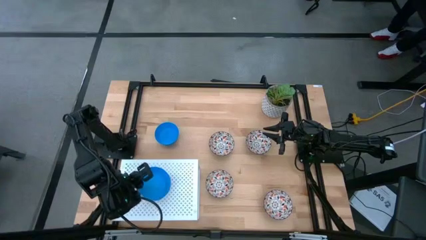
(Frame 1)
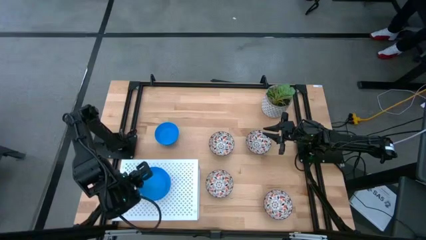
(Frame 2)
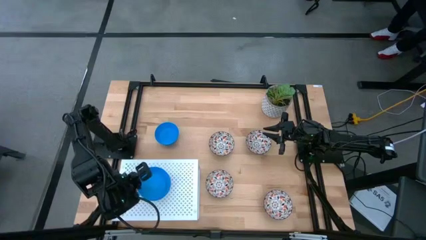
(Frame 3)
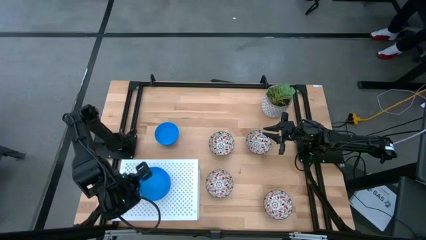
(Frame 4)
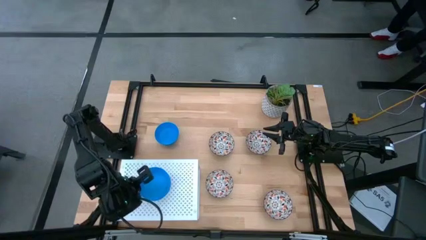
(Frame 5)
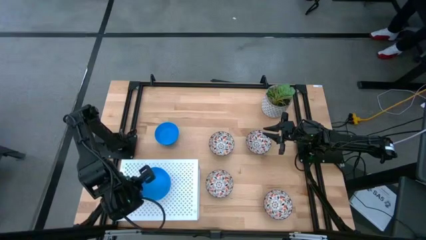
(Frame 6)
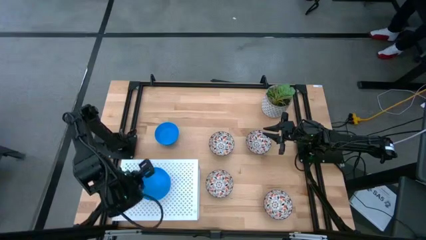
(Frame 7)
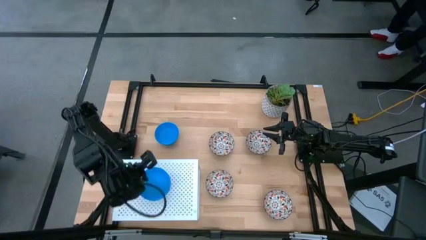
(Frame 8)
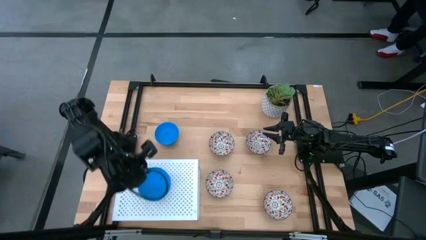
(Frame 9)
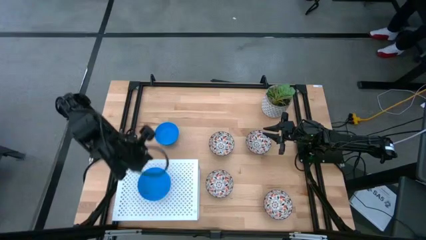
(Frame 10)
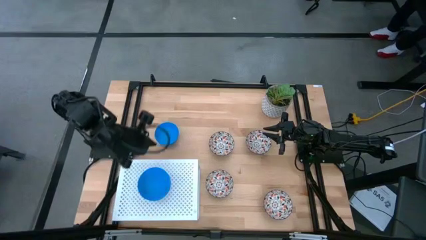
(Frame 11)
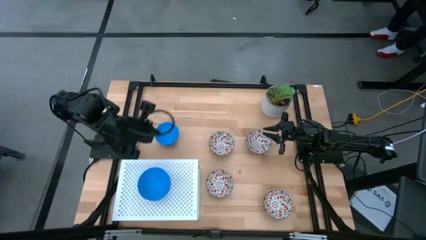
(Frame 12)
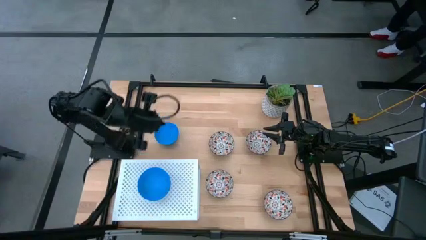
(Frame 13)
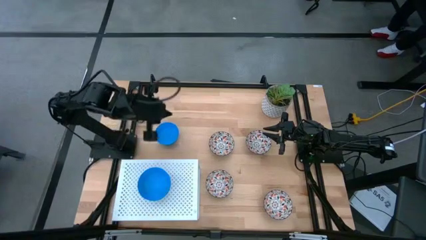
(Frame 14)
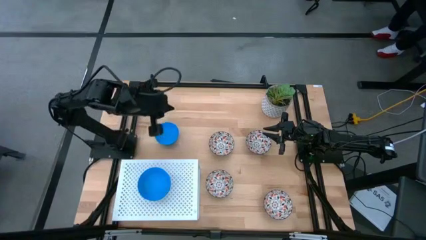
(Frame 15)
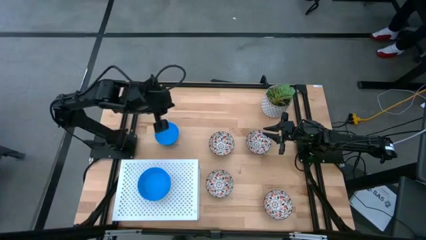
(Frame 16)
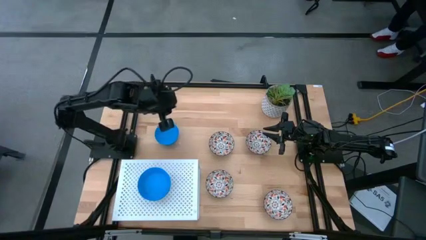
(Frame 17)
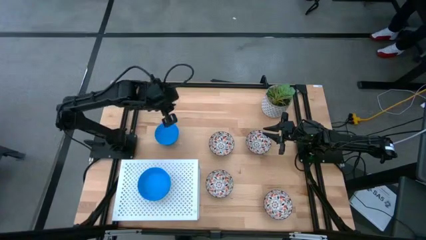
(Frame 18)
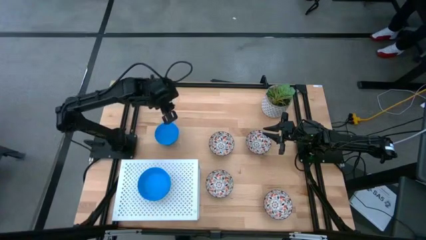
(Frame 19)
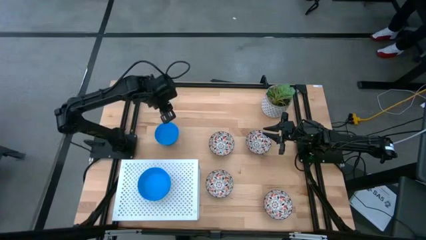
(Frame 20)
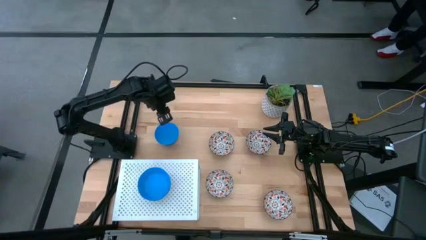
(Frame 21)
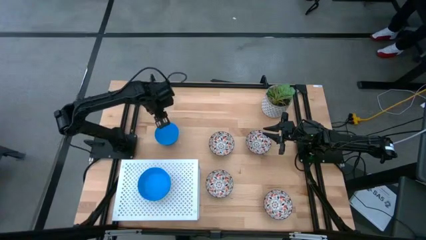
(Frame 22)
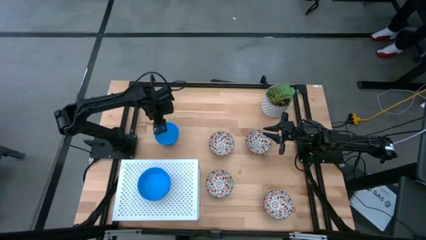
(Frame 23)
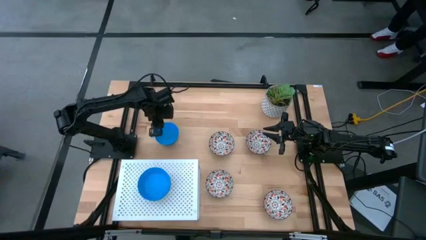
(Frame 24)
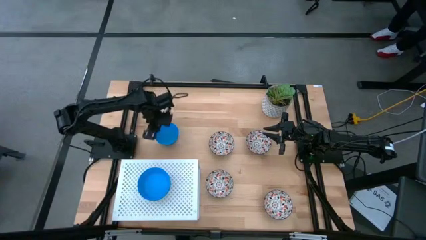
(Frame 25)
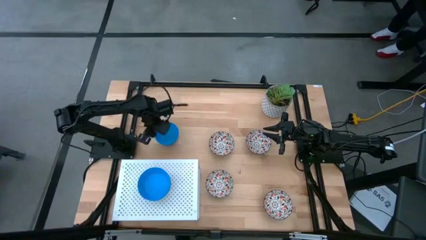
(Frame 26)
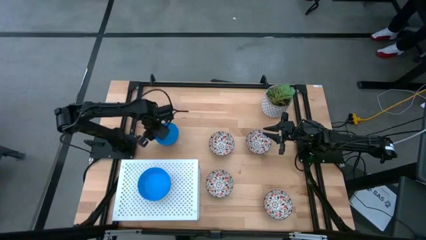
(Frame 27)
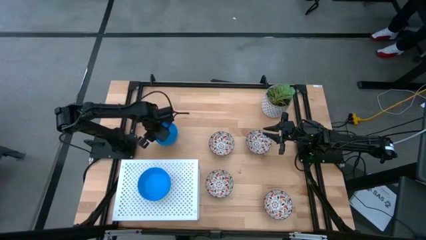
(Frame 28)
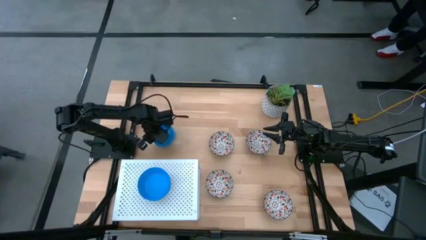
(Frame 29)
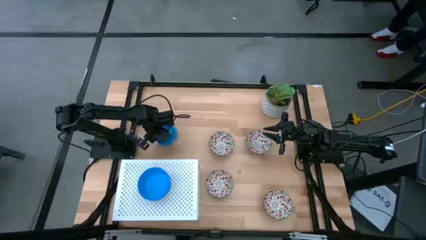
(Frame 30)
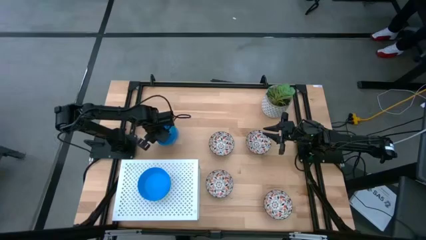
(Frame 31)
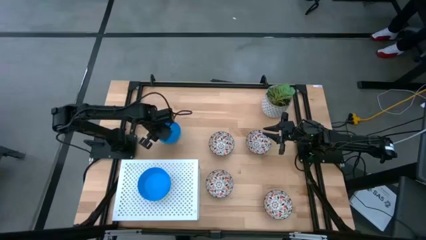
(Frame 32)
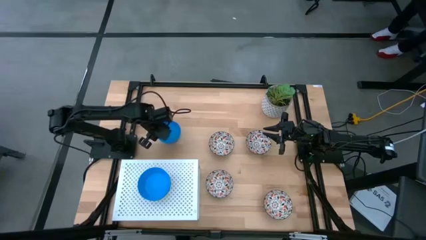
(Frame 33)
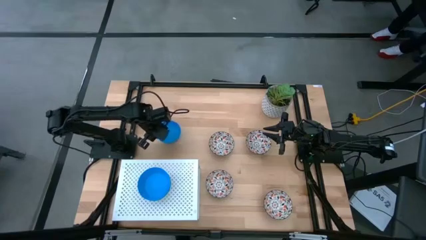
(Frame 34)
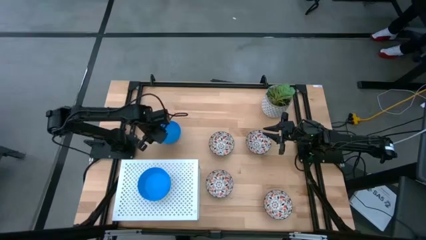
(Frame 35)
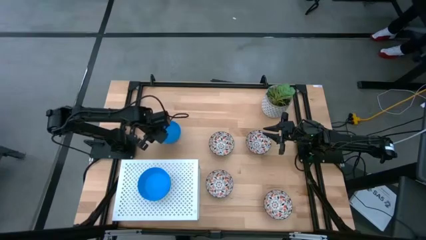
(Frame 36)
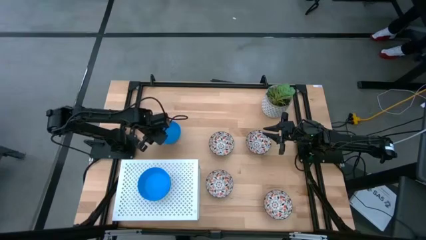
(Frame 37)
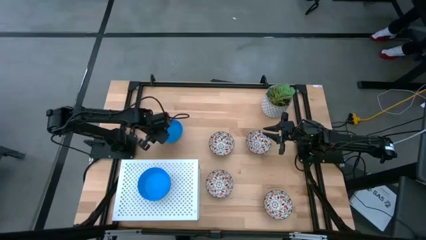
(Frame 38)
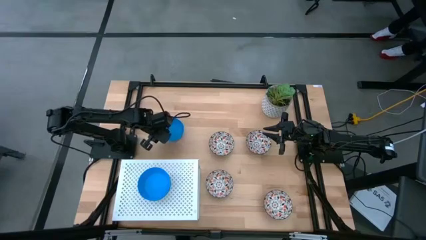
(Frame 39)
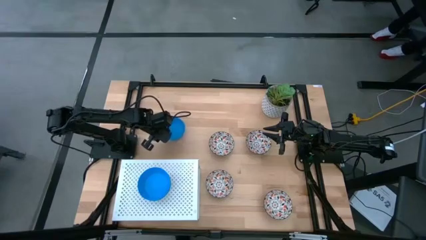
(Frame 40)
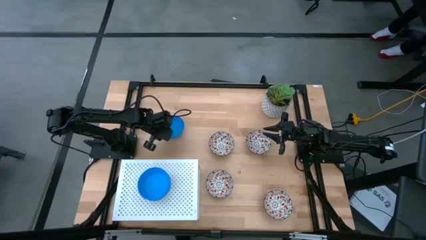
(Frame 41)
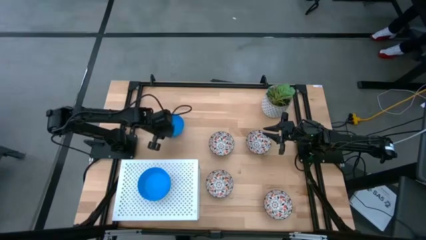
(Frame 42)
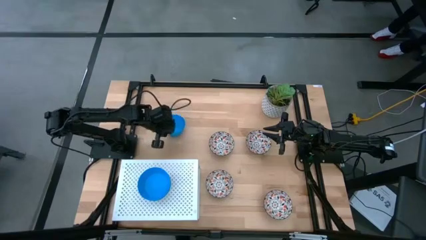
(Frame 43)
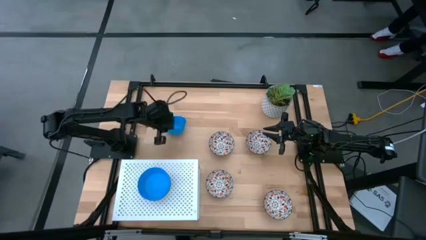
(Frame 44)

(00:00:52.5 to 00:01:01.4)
Task: Pick & Place Mini bowls
Stack the blue bowl on the stacked blue bowls on the shelf

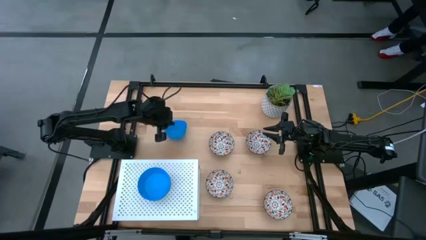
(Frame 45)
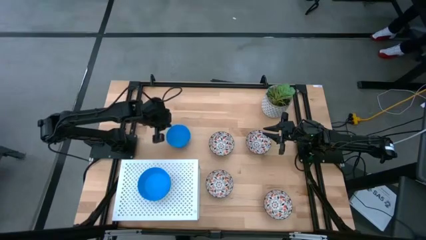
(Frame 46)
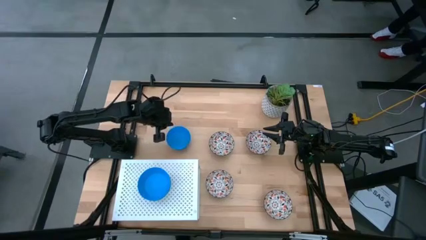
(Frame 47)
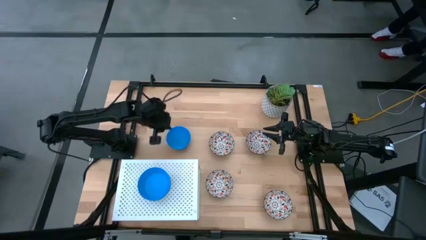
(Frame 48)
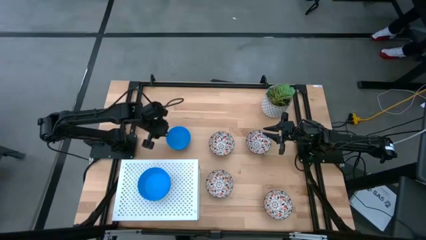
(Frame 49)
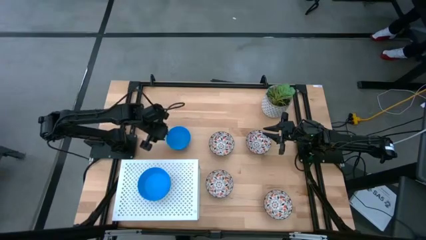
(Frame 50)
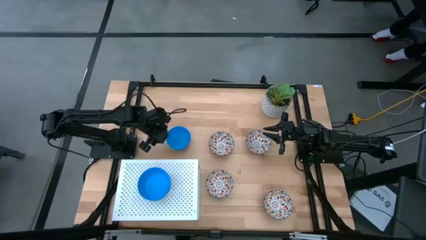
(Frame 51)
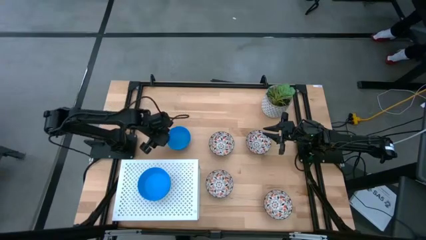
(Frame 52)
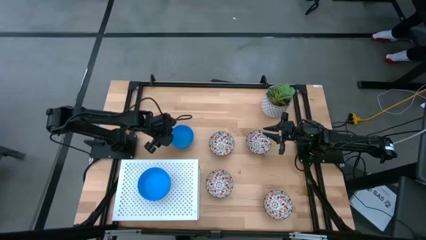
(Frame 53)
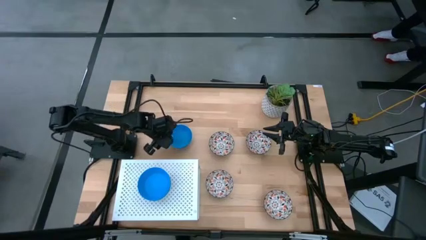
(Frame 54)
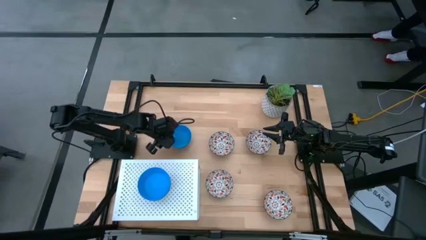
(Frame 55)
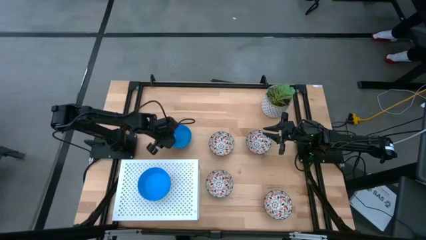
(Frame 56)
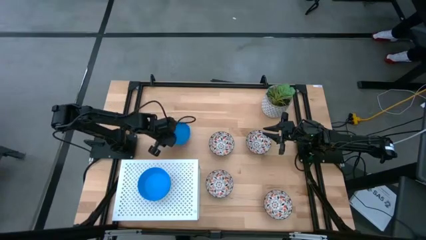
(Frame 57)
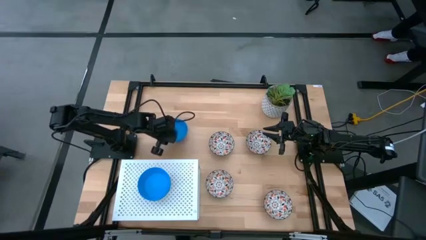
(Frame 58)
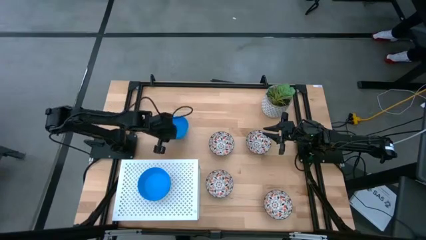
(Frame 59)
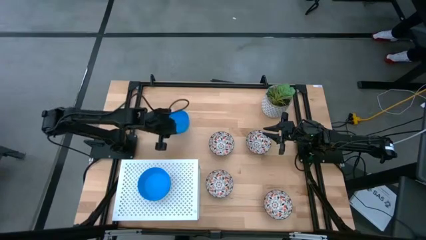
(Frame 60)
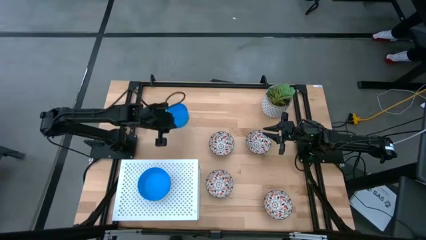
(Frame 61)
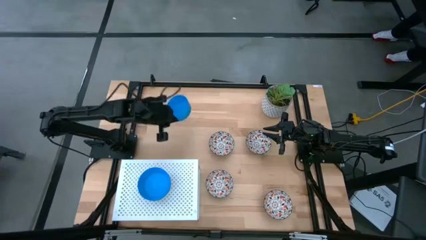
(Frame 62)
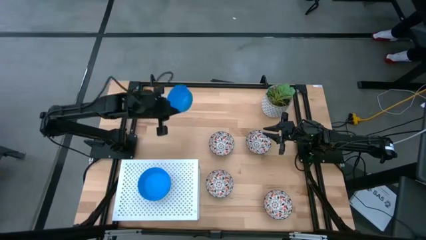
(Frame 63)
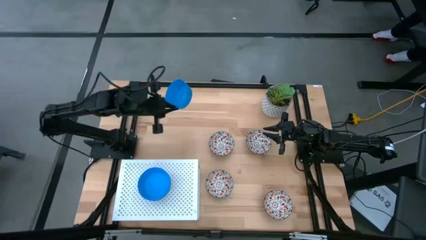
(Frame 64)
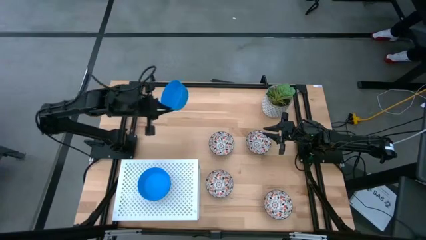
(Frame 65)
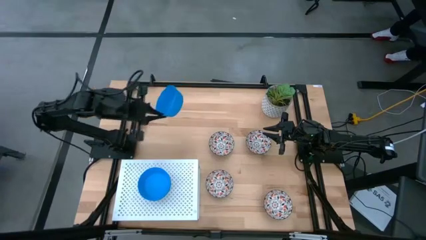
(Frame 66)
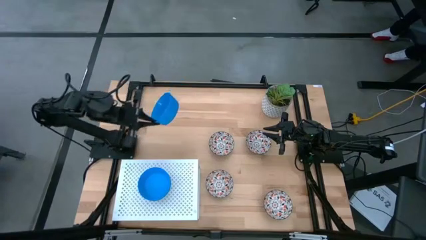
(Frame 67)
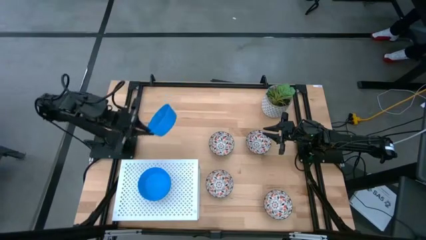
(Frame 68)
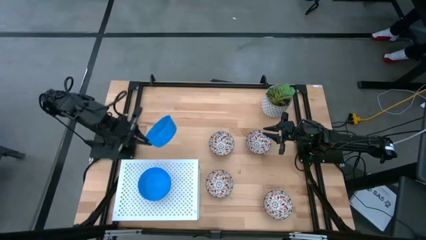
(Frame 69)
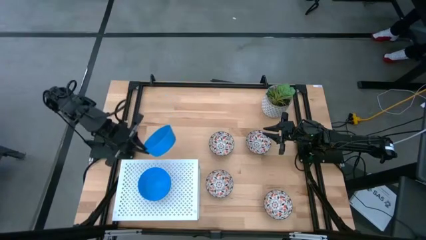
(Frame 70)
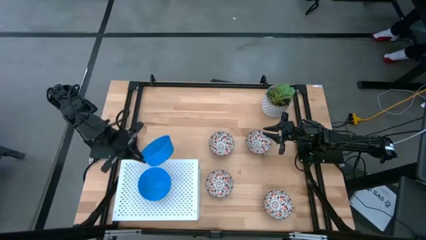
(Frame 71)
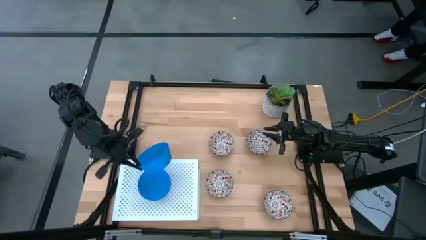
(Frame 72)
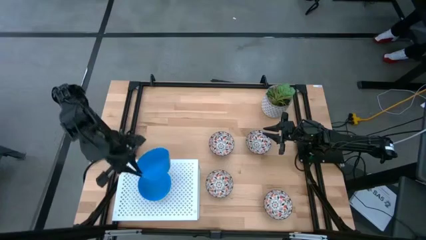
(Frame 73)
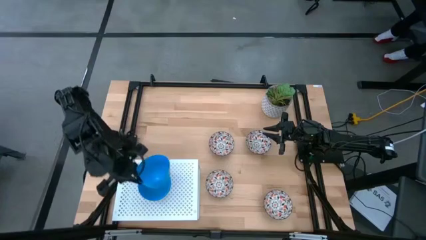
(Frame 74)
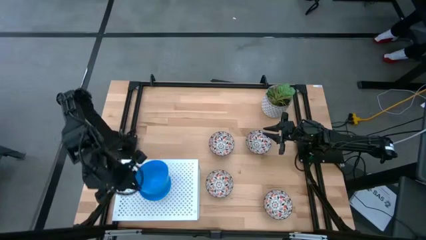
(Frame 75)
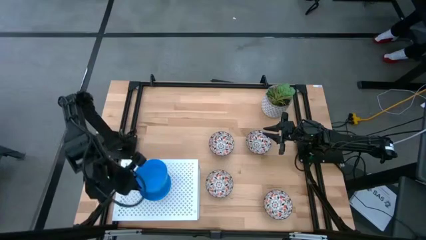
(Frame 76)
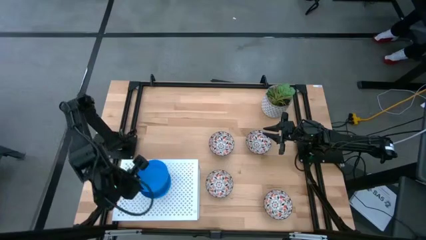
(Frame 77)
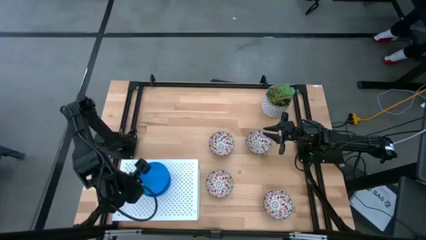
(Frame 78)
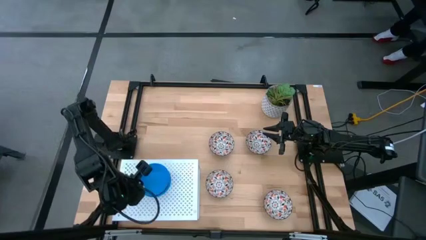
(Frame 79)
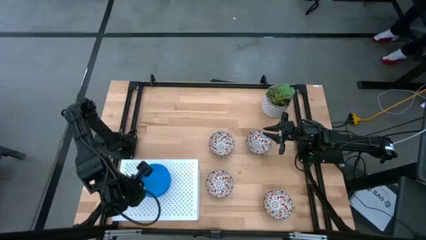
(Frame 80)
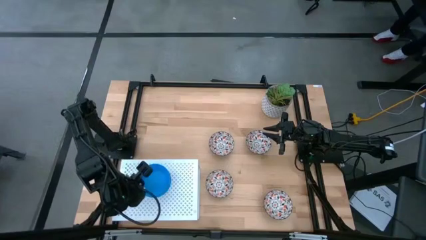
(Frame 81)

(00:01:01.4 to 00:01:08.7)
Stack the blue bowl on the stacked blue bowls on the shelf
